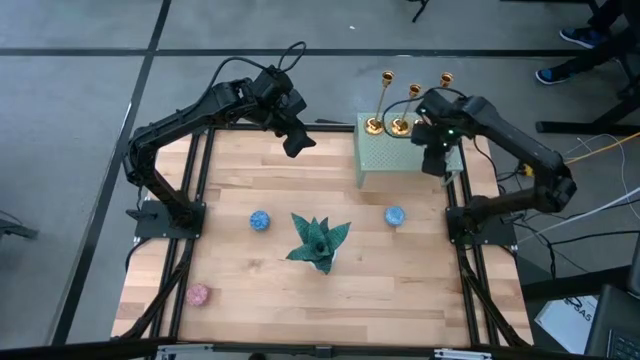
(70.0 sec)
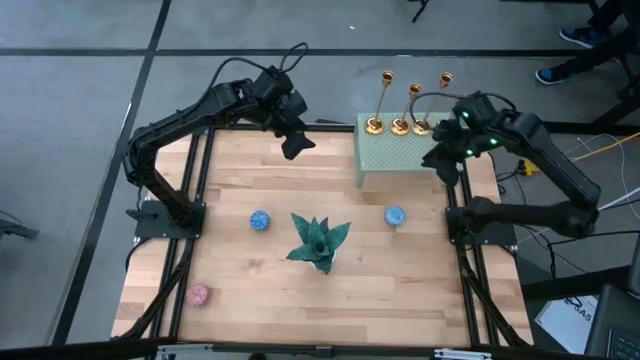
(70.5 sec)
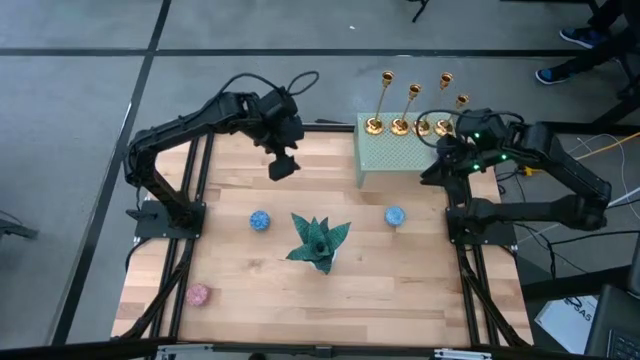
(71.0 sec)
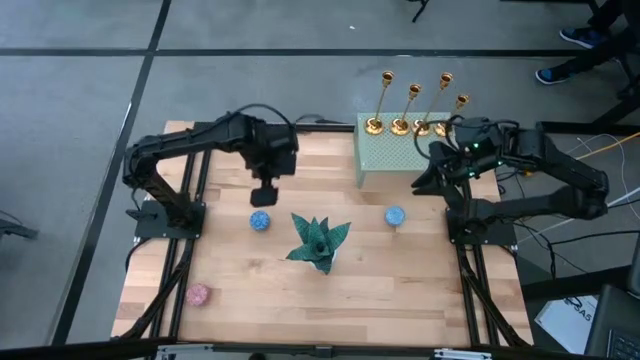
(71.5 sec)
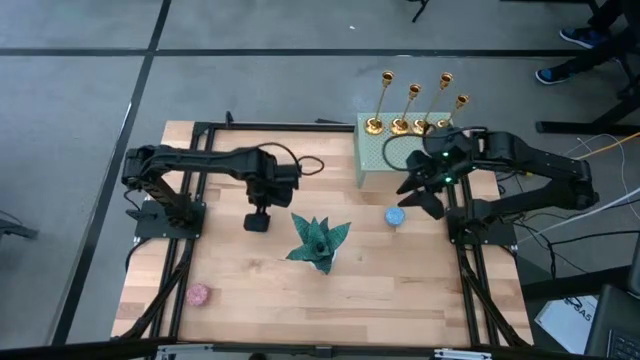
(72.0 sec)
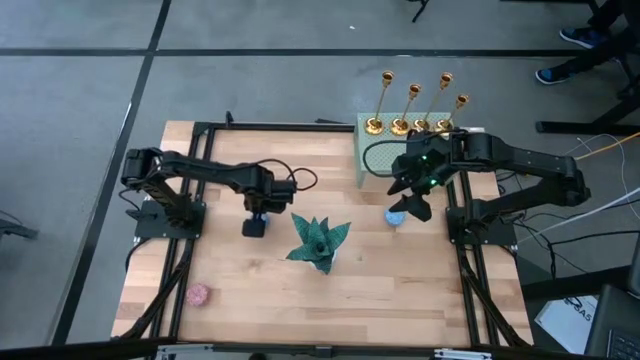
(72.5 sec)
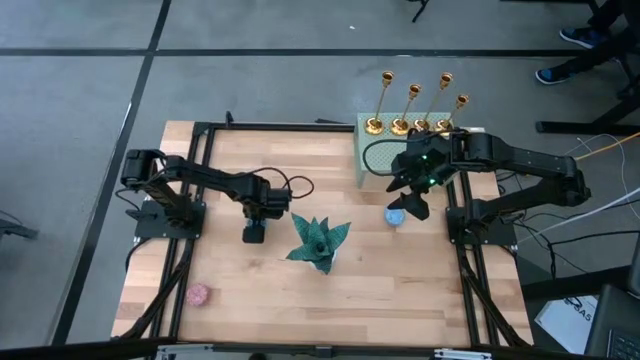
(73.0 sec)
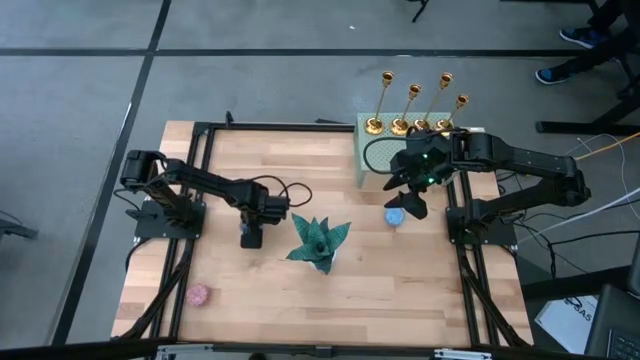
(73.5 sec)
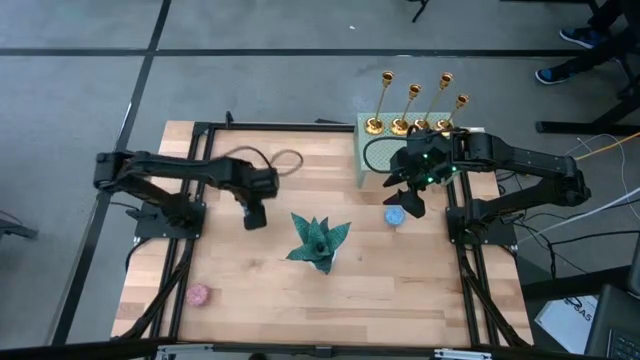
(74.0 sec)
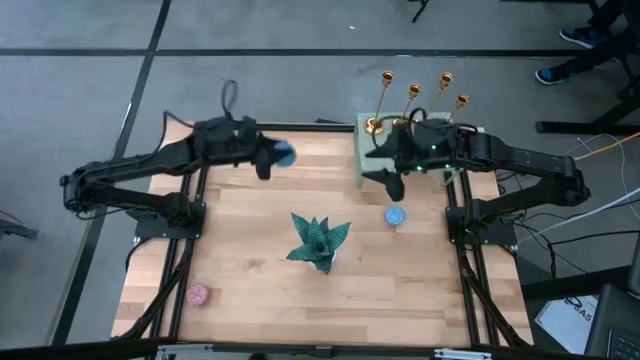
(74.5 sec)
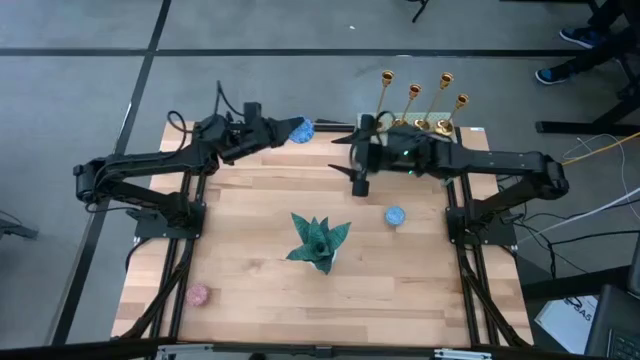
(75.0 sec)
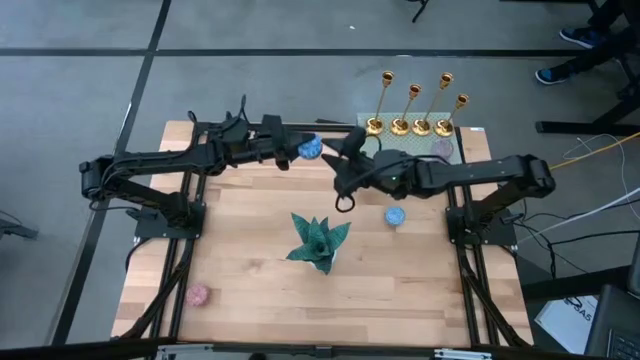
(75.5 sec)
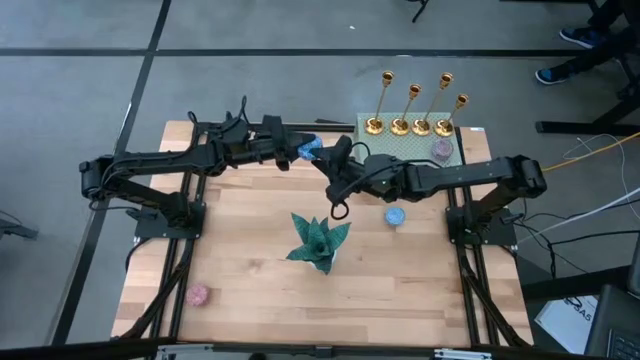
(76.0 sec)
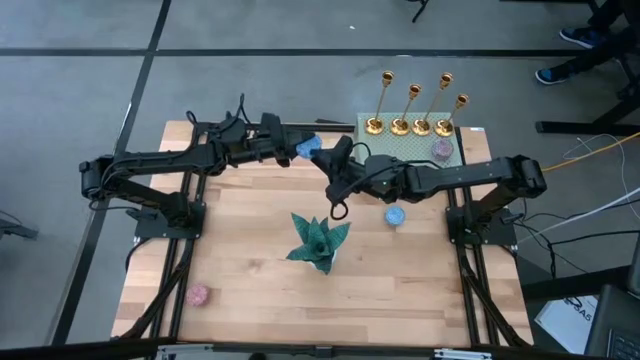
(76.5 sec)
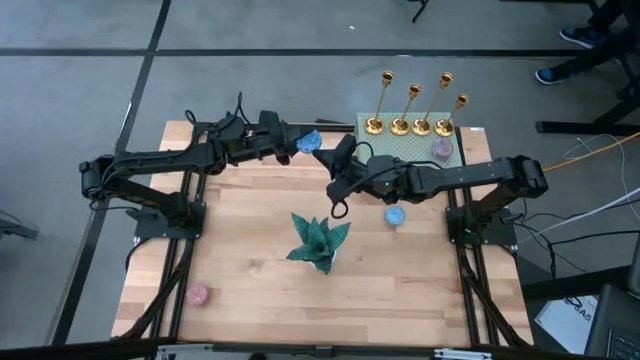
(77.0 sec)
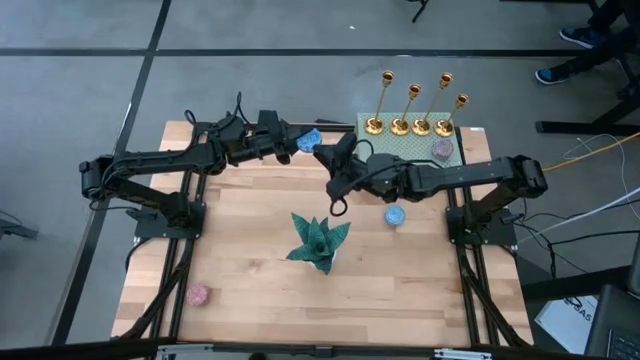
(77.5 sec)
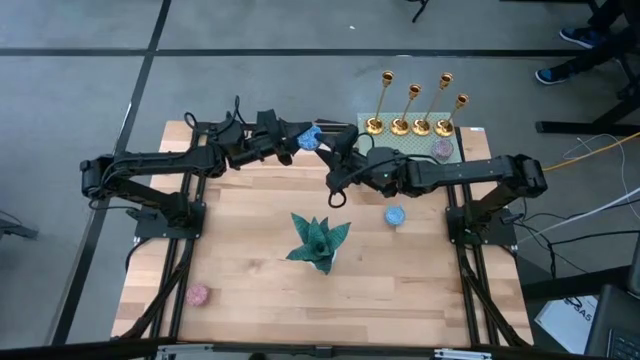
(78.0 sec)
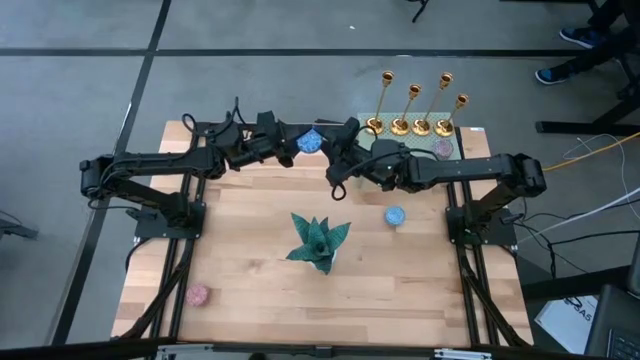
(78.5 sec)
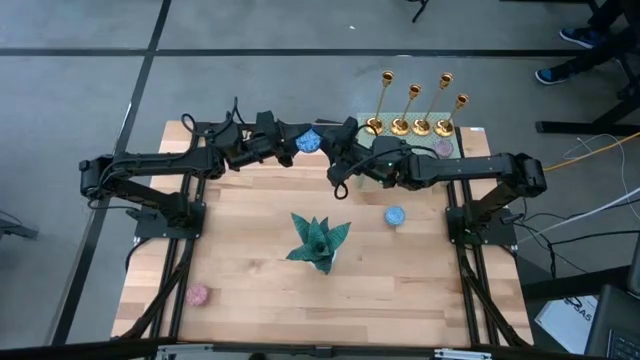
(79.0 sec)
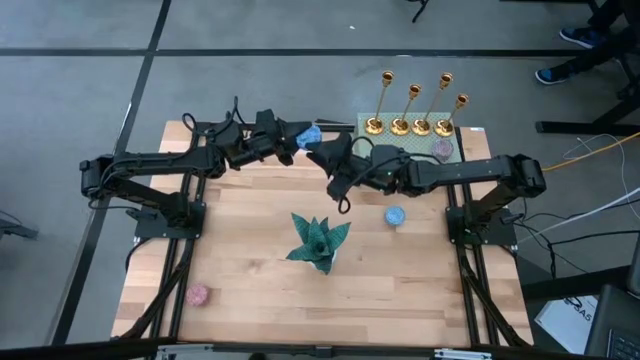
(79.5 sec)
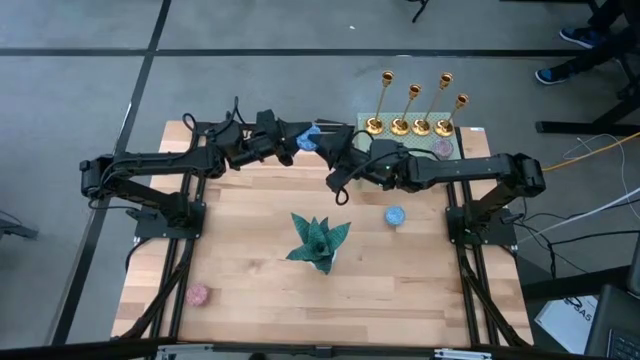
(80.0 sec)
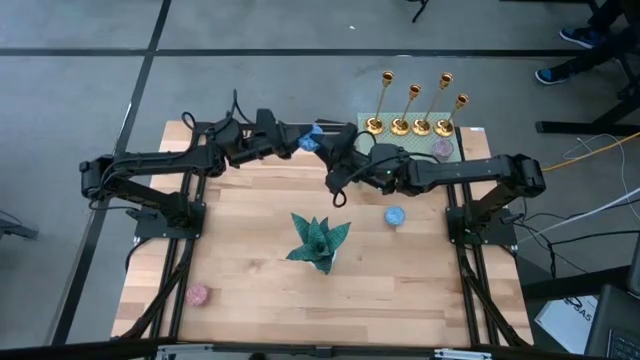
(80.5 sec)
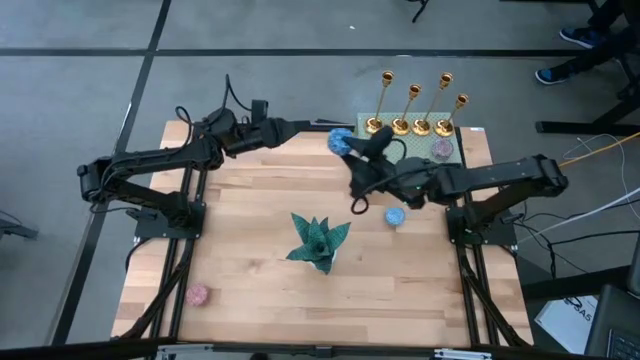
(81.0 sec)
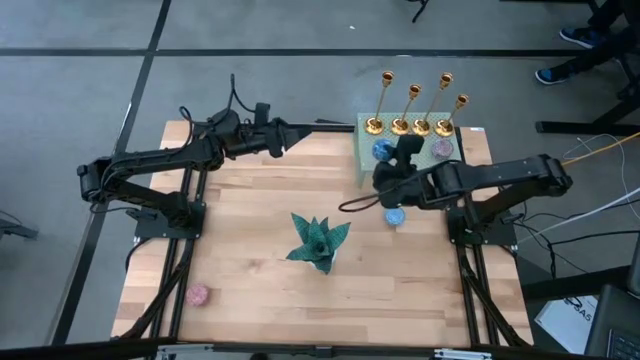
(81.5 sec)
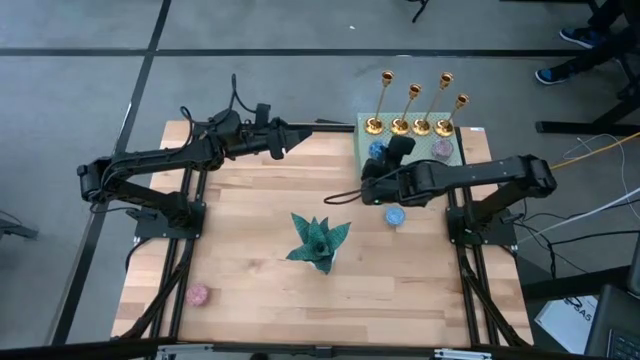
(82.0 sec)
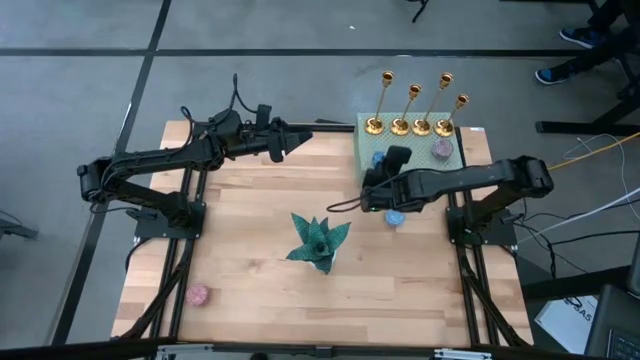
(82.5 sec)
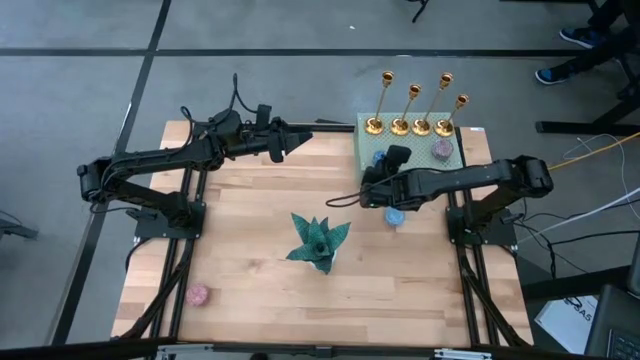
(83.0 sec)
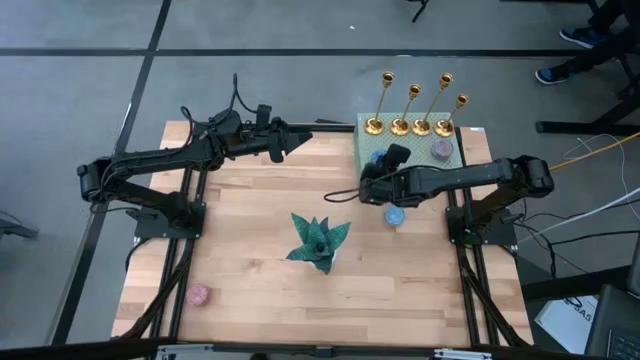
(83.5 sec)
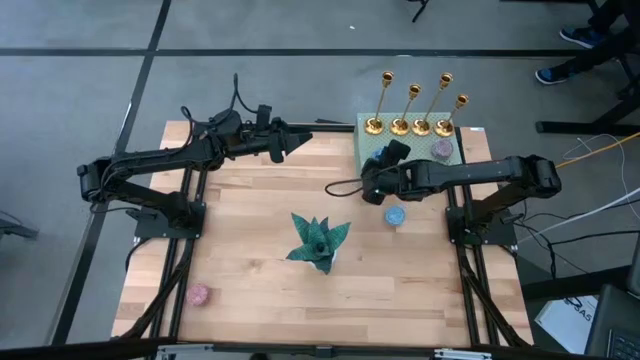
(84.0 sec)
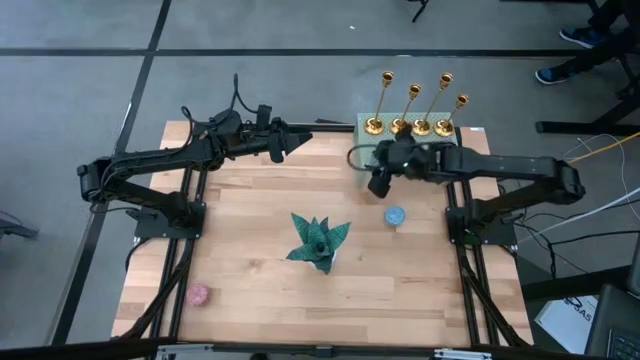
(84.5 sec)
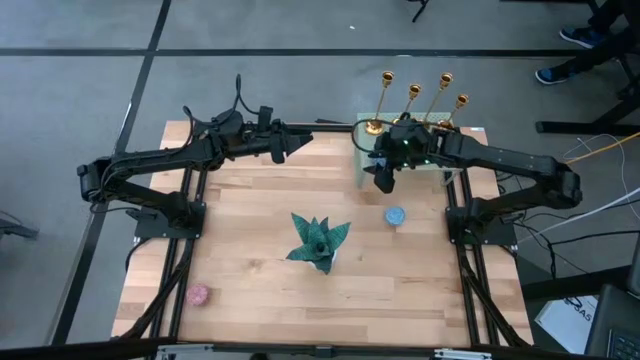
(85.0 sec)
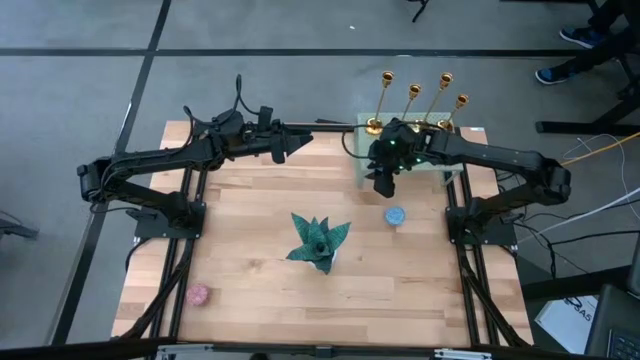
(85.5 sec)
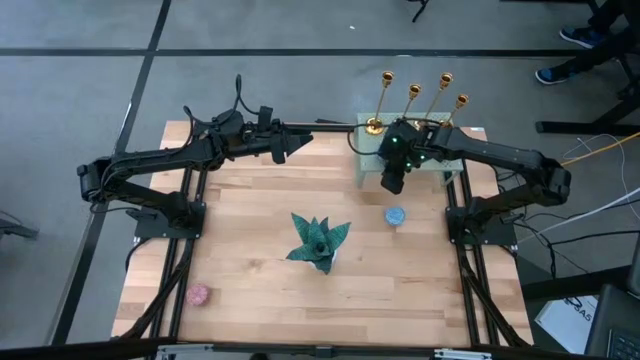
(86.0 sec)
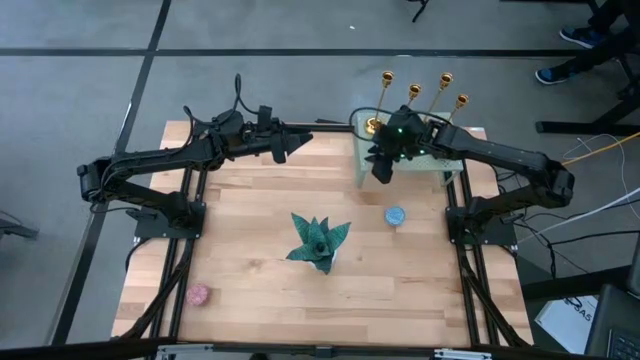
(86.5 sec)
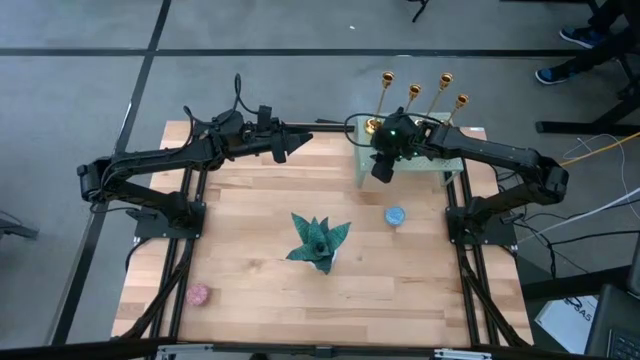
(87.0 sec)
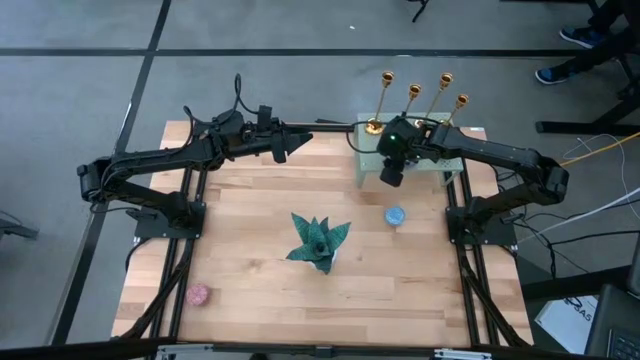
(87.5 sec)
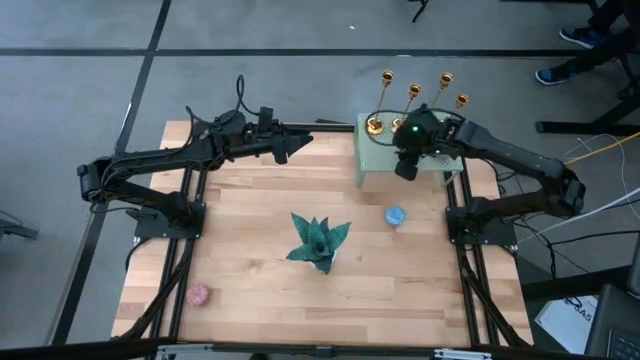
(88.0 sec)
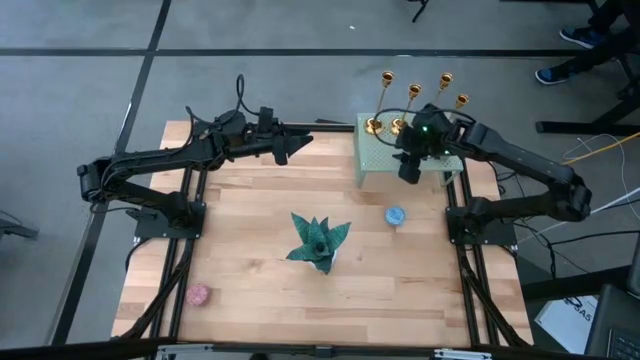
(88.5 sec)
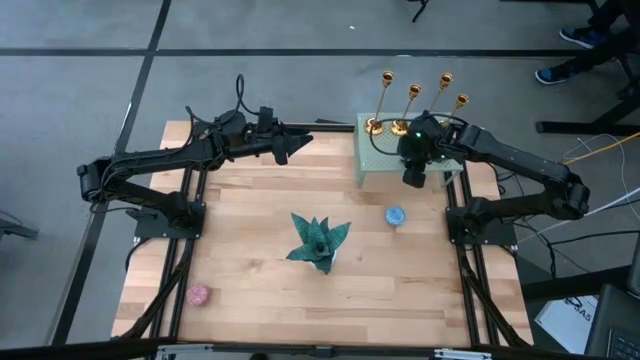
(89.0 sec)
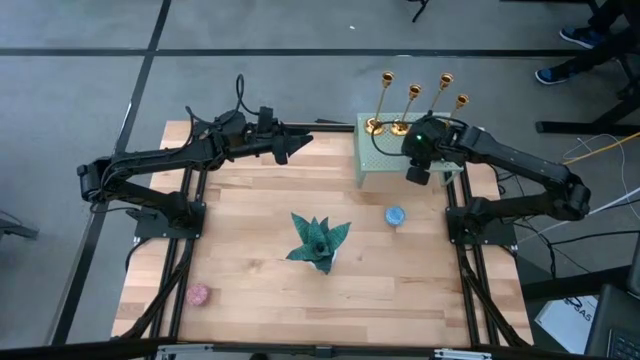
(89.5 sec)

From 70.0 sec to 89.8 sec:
Task: Stock candles and holders on shelf
Align the blue scented candle with the other scented candle on the shelf

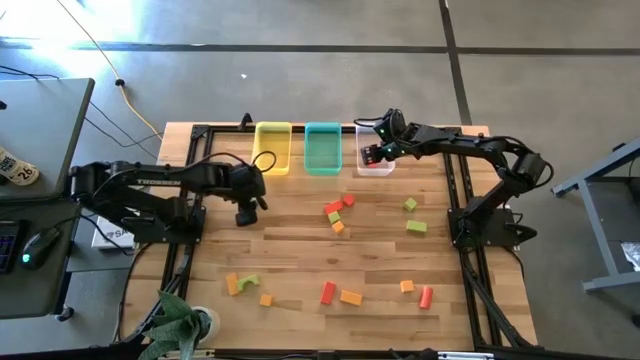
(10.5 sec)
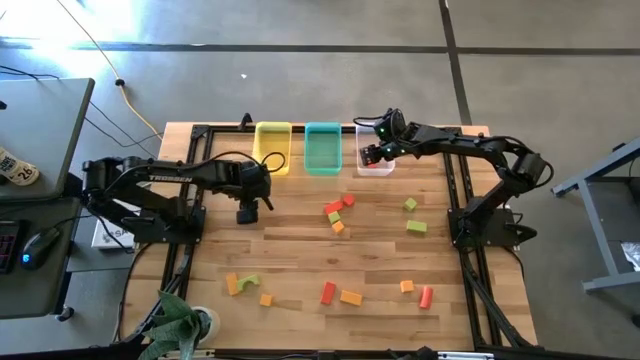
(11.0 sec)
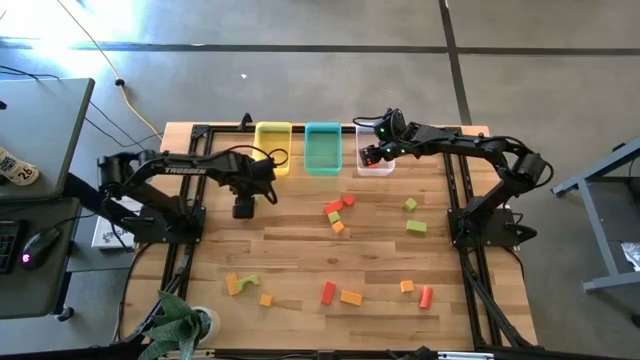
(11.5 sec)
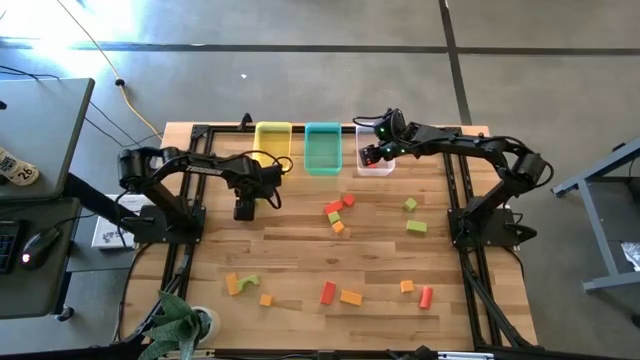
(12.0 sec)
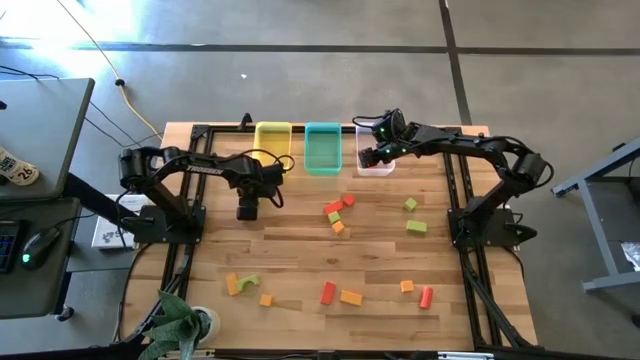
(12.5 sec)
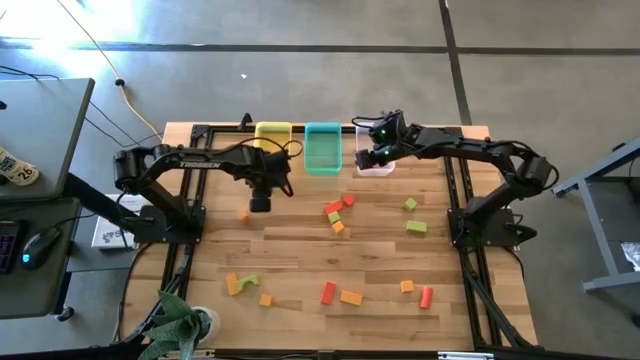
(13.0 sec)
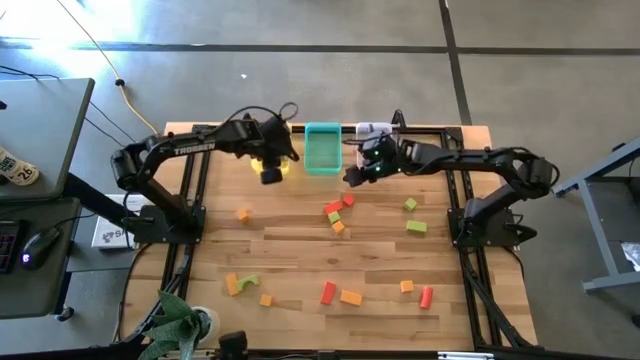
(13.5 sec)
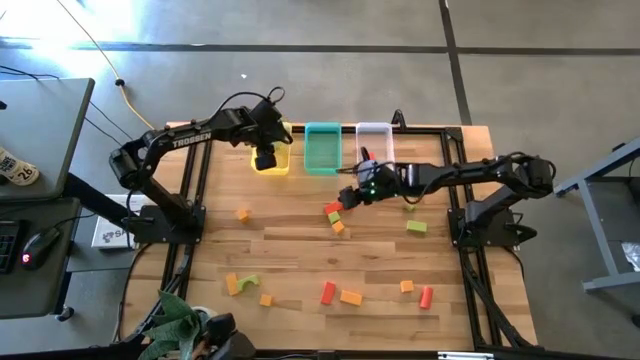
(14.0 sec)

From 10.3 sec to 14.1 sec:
Task: Sort & place blocks by color
Put the green block into the yellow bin
